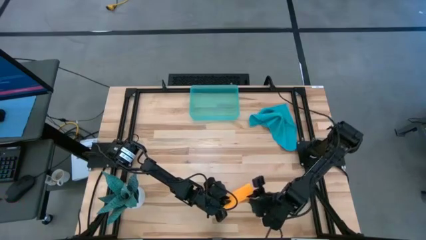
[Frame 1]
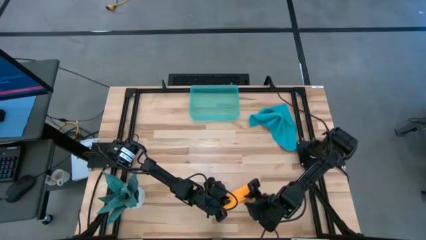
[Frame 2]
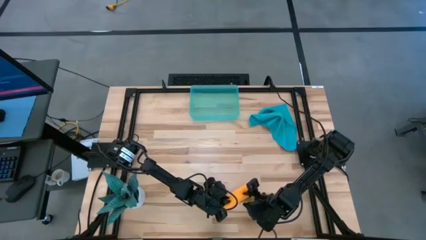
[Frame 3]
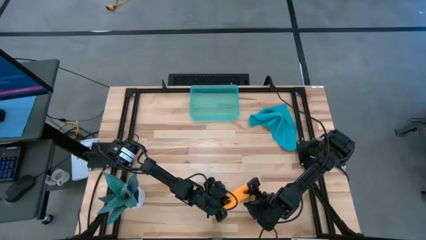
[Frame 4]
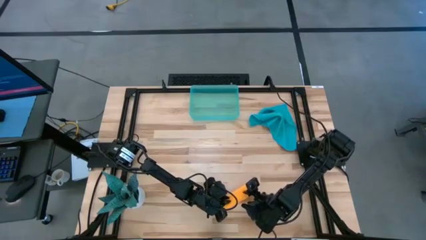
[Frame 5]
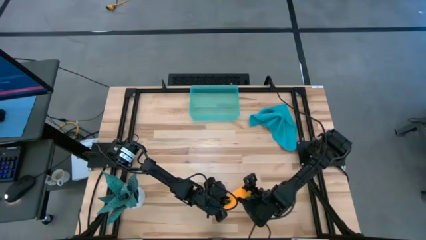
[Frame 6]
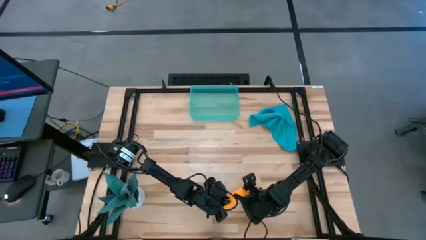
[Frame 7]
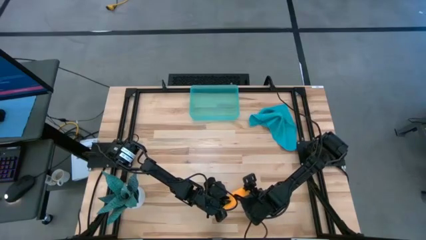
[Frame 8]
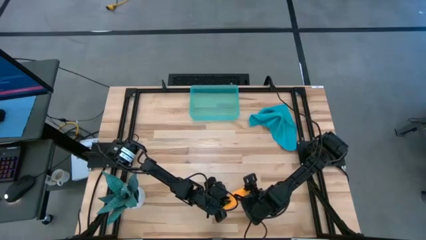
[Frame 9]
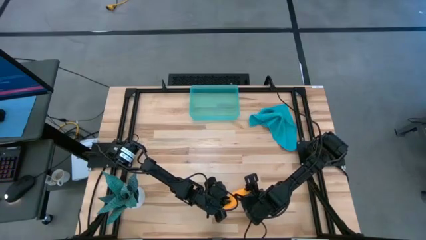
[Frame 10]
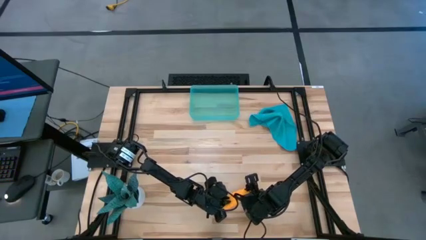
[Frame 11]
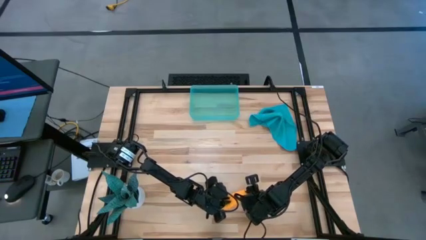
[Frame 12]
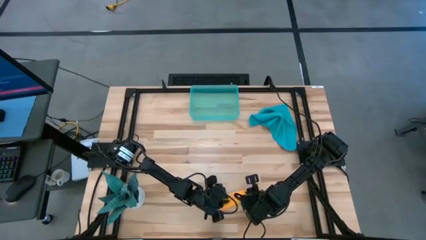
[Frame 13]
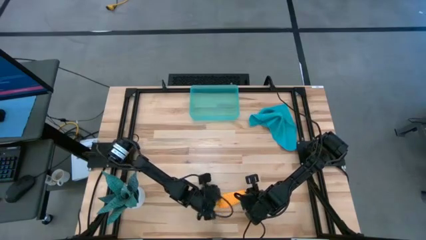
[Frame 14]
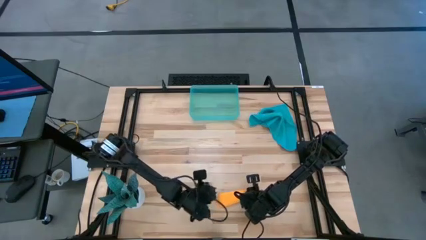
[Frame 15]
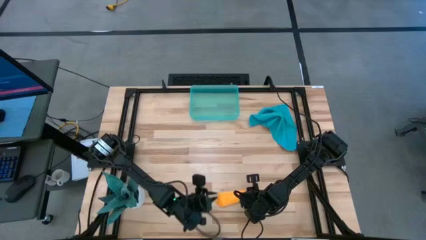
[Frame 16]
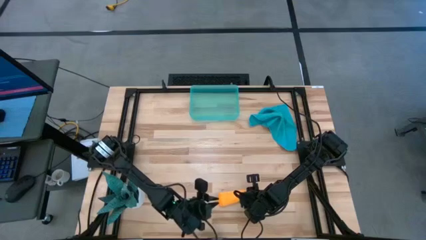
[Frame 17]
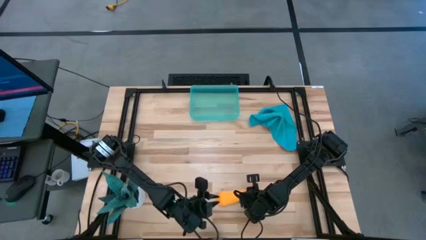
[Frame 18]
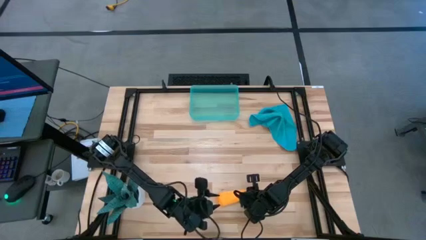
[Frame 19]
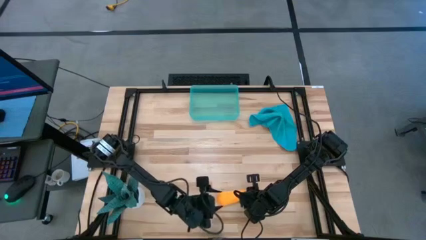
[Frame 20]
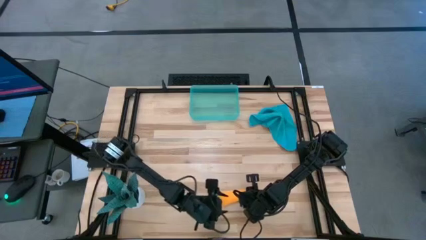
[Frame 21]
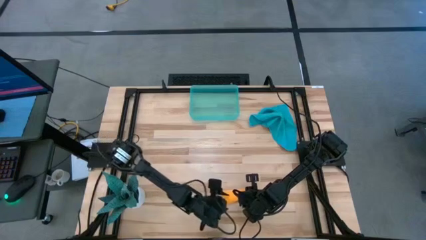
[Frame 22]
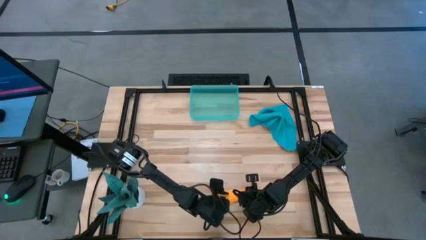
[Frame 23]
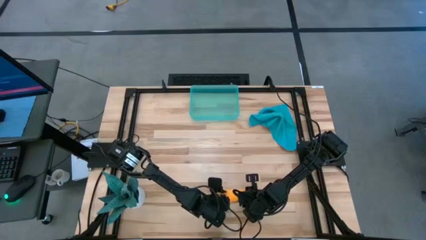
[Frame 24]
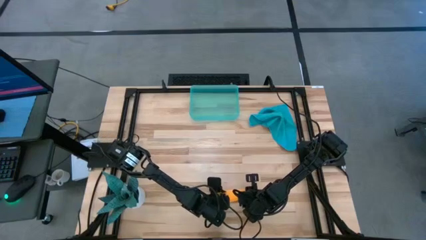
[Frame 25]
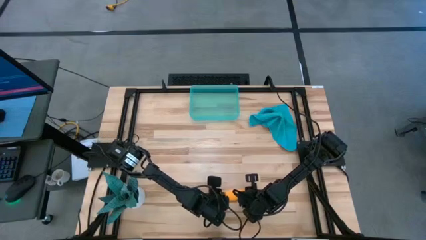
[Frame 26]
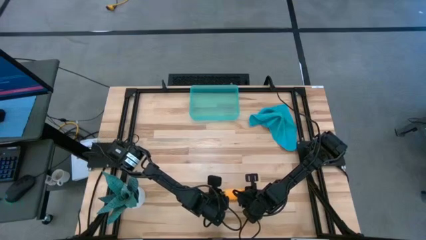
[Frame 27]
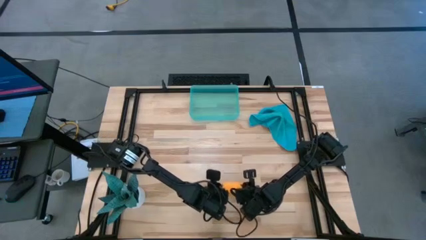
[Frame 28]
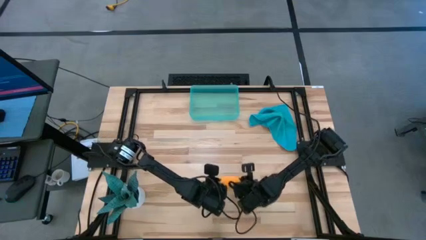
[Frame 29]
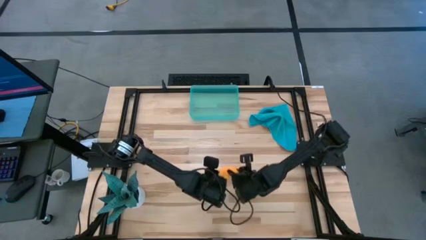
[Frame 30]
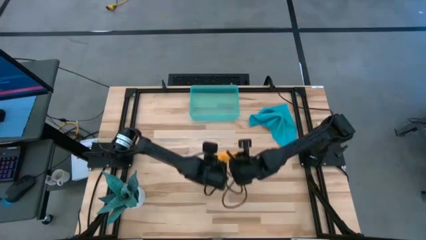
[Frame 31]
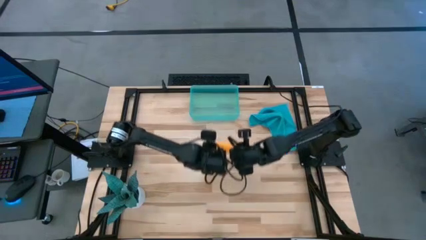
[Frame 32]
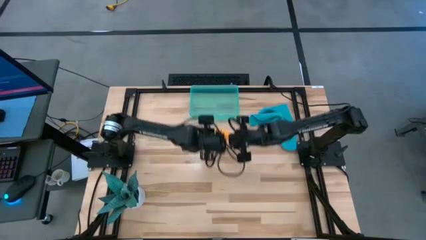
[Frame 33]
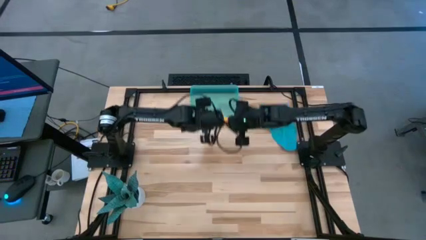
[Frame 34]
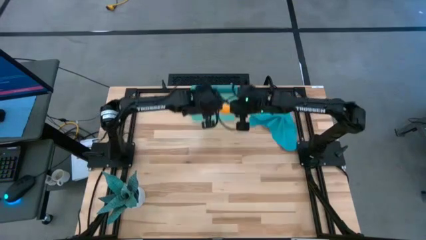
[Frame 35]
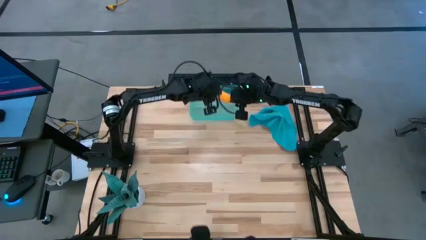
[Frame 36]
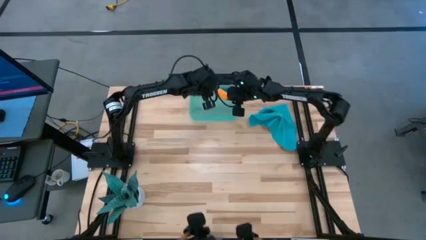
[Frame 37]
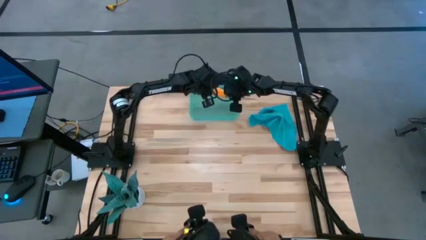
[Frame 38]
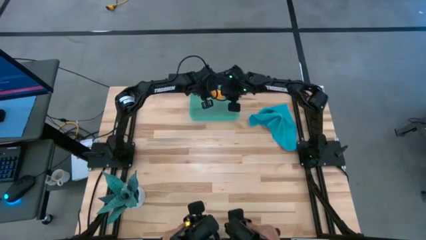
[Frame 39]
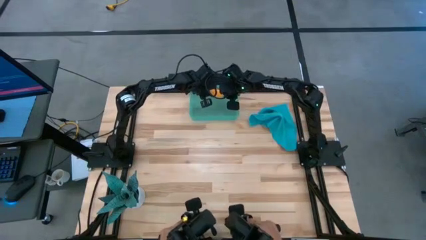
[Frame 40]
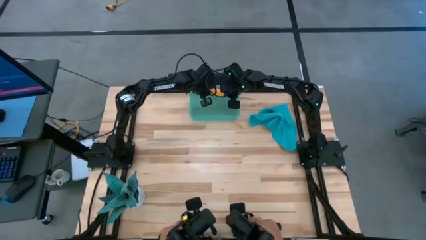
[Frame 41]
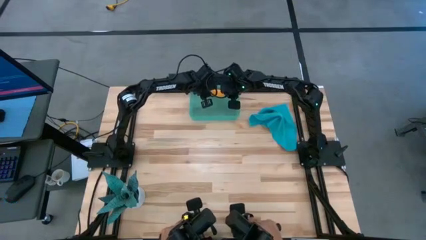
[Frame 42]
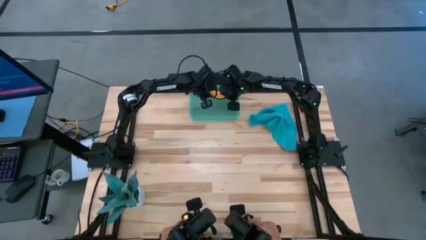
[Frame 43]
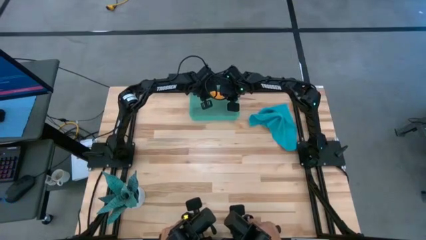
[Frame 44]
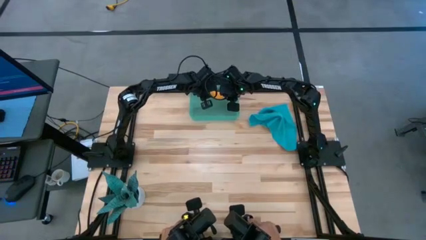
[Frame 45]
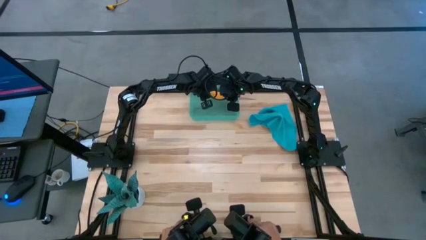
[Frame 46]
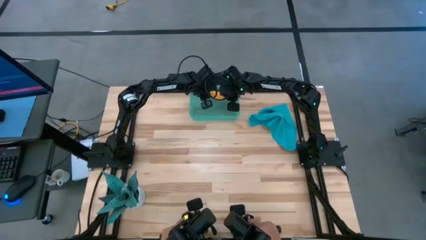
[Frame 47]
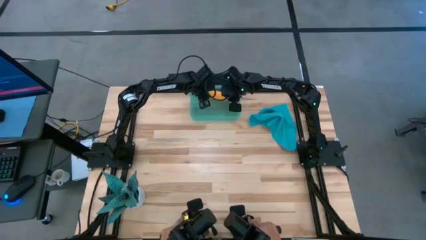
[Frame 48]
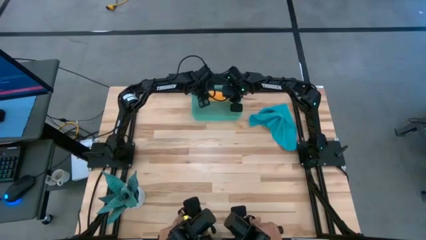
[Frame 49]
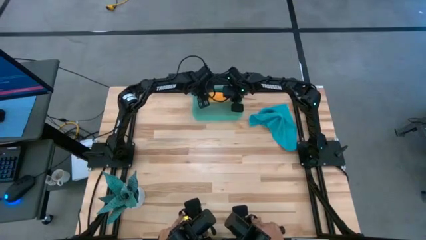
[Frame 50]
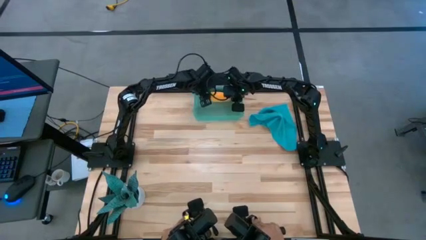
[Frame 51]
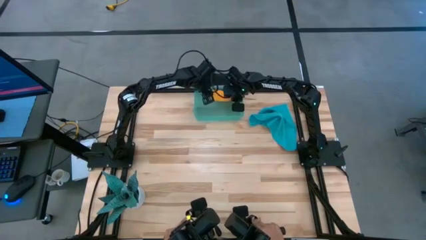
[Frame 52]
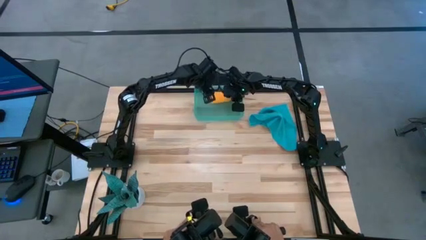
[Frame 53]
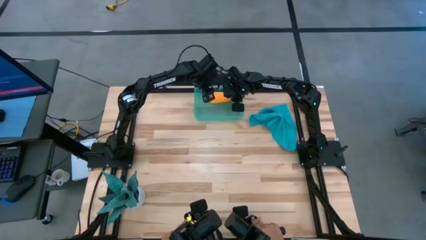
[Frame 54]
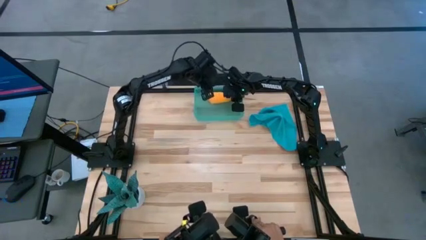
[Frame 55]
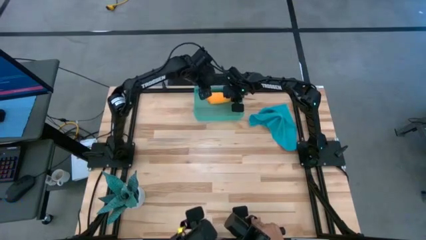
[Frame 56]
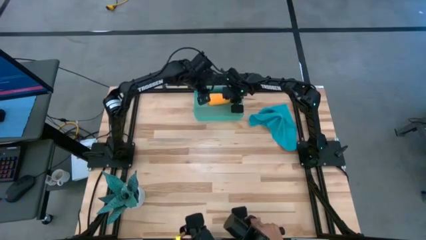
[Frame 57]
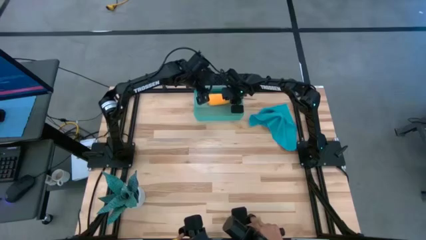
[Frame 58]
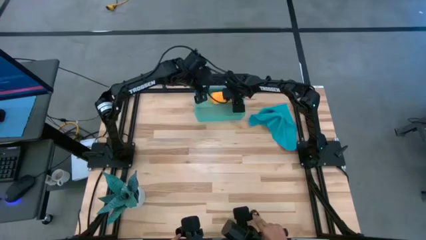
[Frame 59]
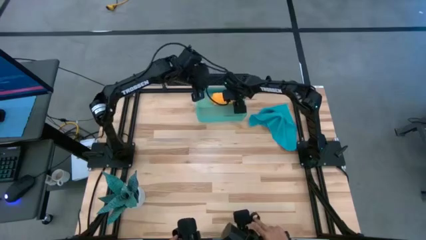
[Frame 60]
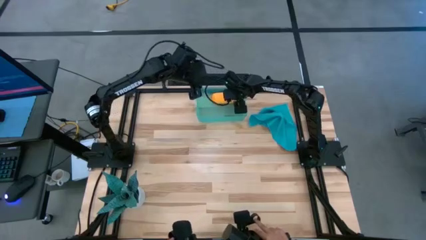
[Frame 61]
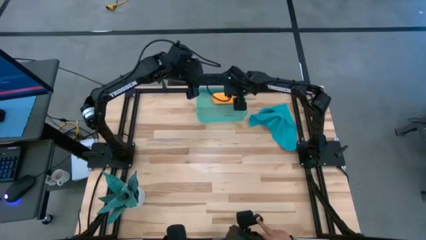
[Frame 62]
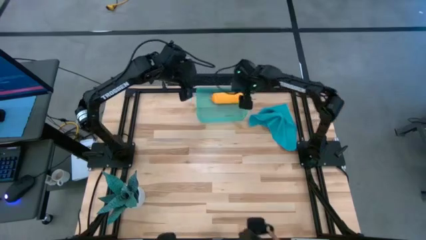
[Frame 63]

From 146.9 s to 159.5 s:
Task: Roll microfiber towels into tight, uniform cylinder then place into a basket
Put the rolled yellow microfiber cloth into the blue bin
